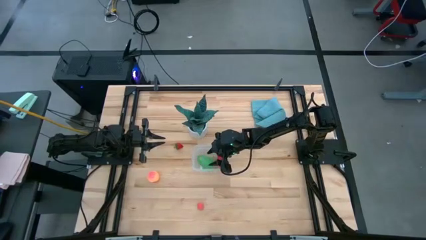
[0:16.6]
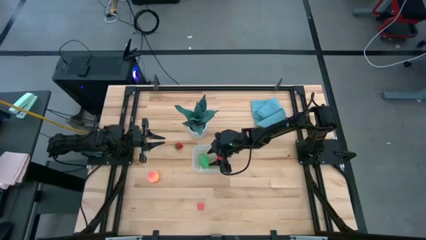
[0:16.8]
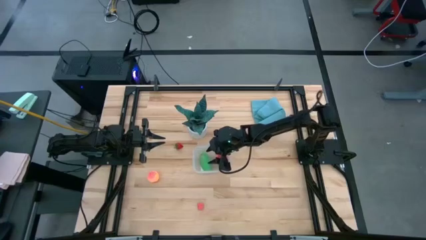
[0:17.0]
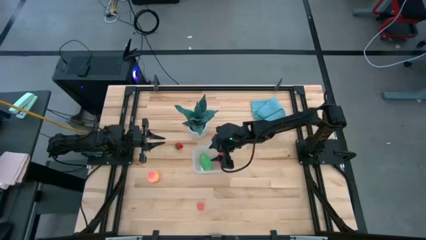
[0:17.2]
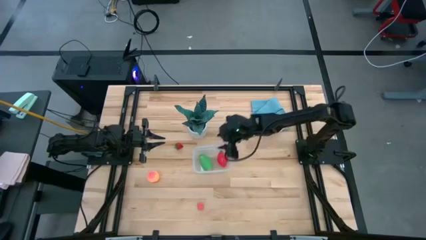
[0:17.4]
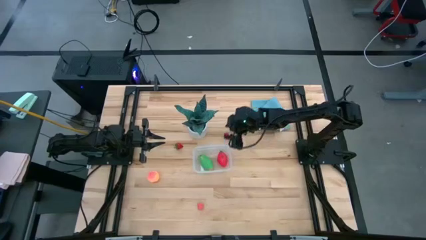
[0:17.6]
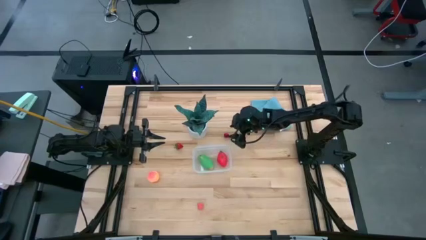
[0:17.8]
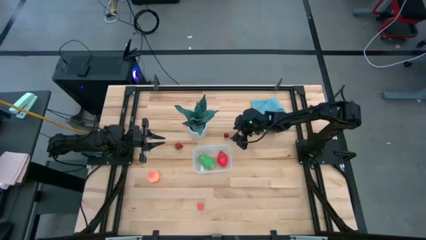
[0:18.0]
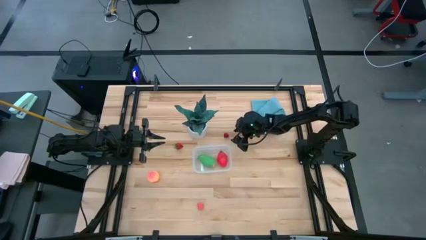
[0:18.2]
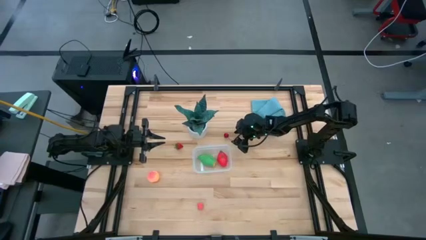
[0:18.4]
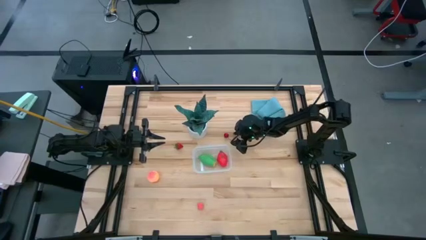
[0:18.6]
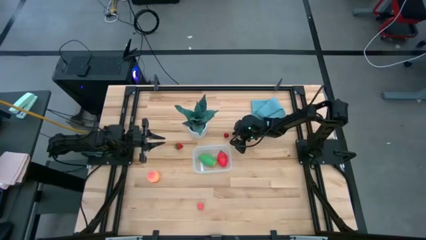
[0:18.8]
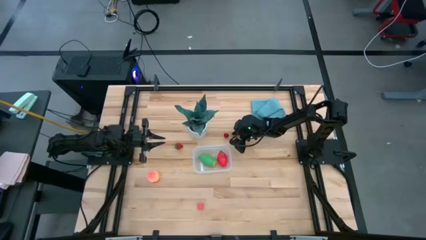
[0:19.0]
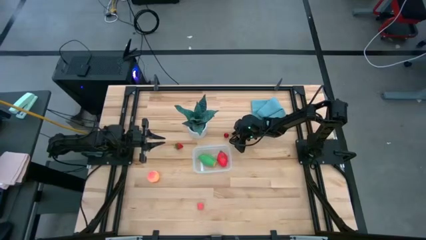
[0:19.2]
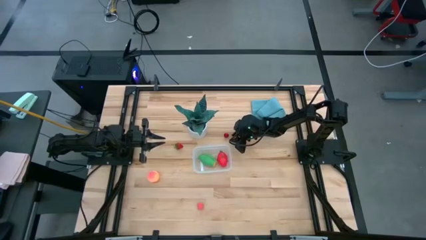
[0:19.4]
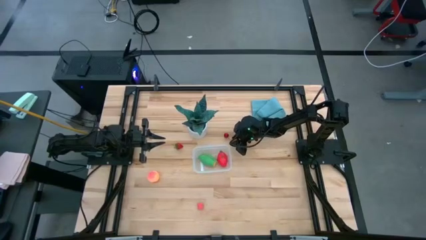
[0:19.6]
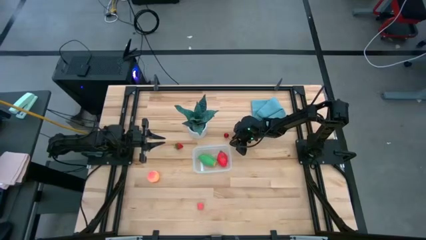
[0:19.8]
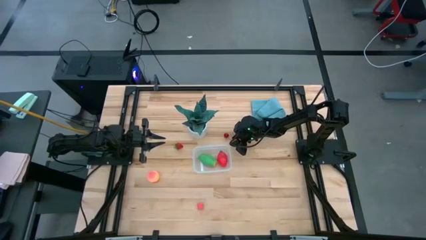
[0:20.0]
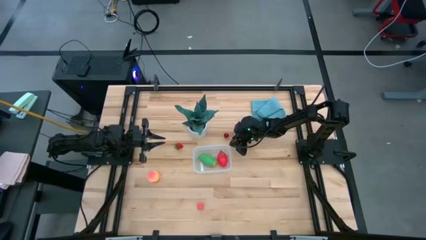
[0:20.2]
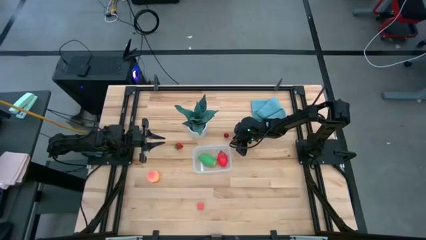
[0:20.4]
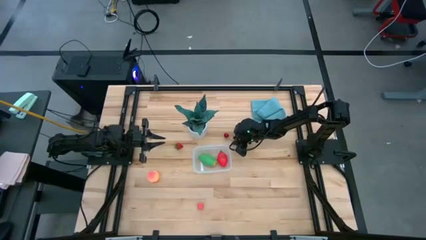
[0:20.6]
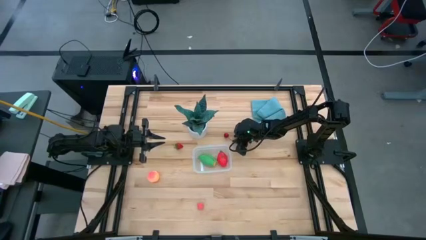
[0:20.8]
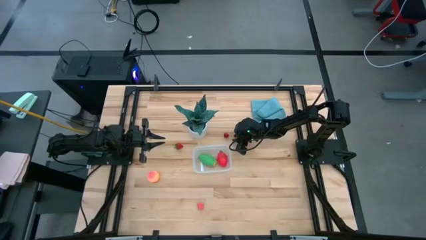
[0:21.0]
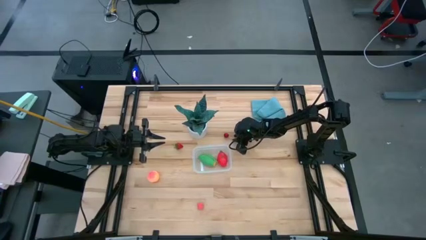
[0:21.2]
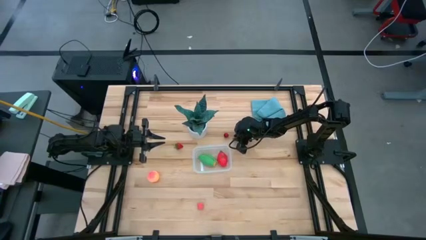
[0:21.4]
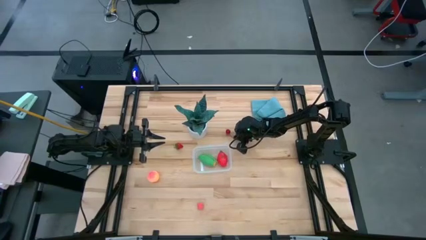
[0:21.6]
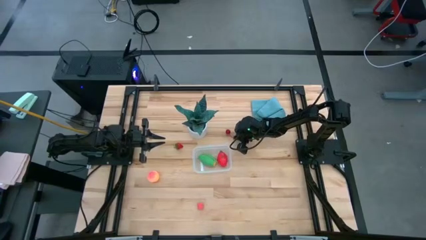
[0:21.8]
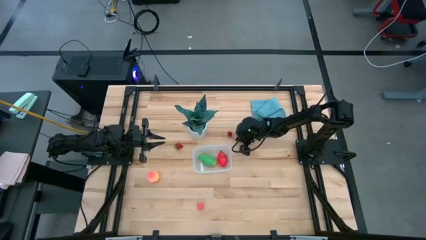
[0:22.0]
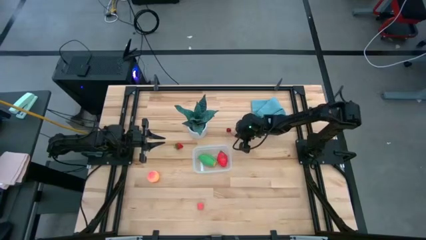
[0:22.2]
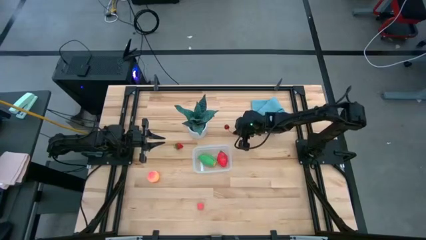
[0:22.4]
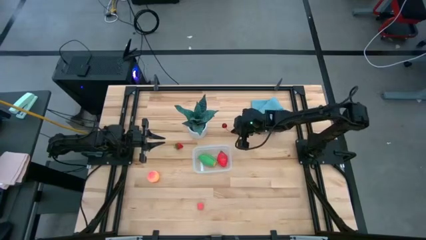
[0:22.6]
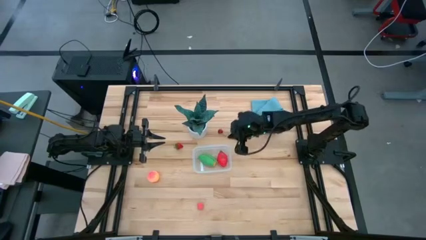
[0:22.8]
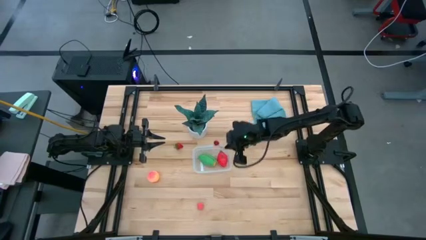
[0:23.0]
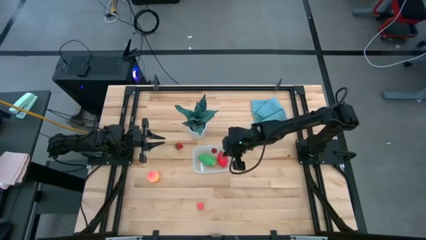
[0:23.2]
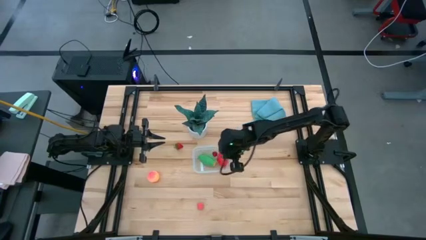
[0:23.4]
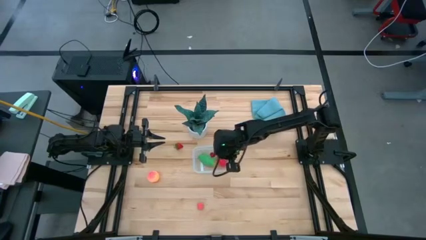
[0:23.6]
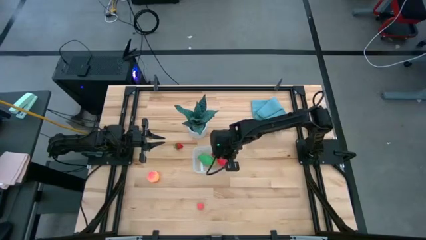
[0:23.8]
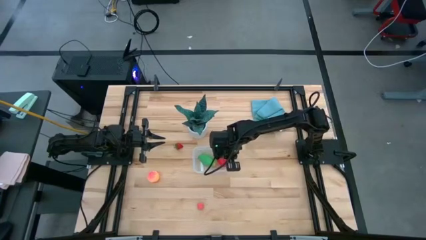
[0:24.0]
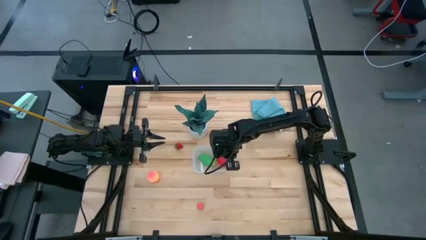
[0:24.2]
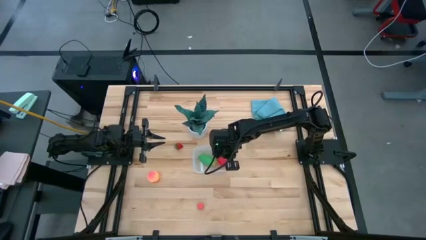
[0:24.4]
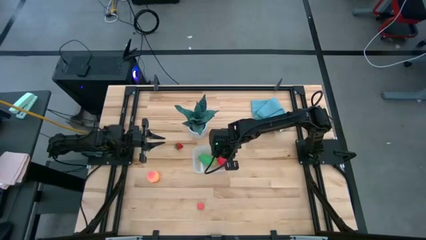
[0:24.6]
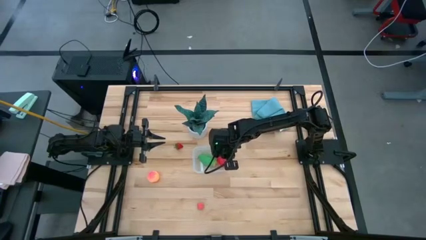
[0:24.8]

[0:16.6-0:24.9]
Task: Pick and placing Produce into tupperware
Put the cherry into the transparent container

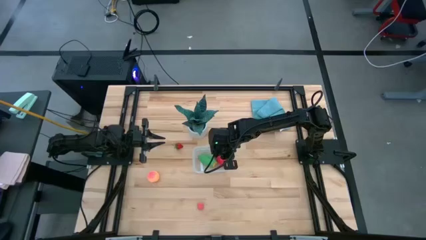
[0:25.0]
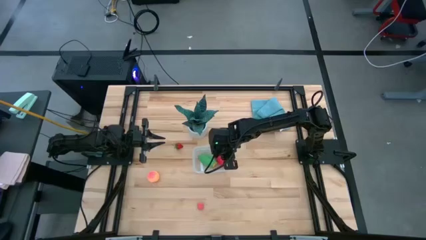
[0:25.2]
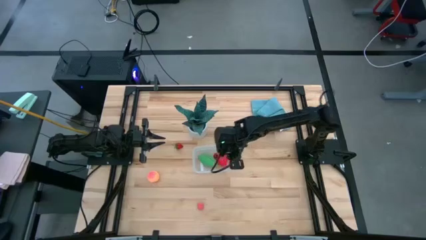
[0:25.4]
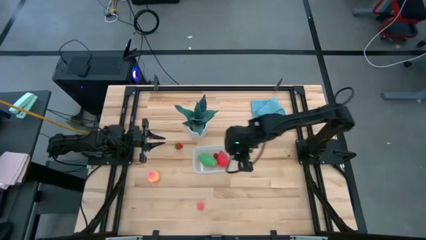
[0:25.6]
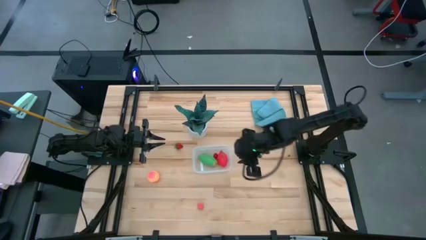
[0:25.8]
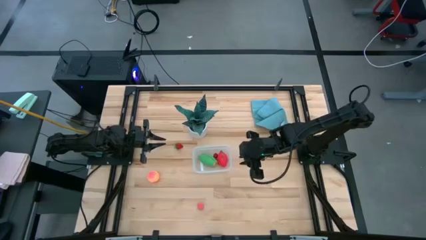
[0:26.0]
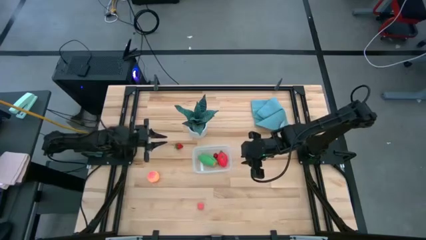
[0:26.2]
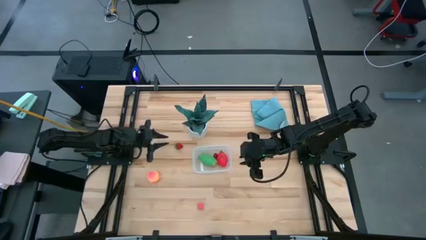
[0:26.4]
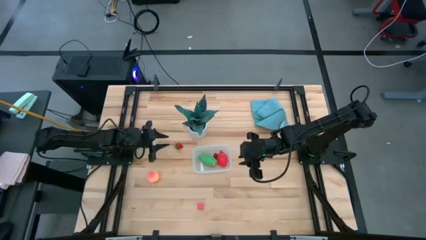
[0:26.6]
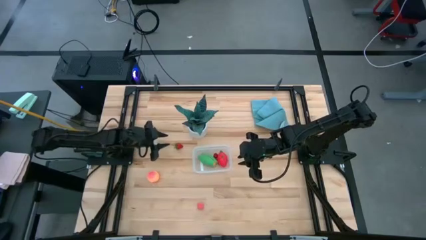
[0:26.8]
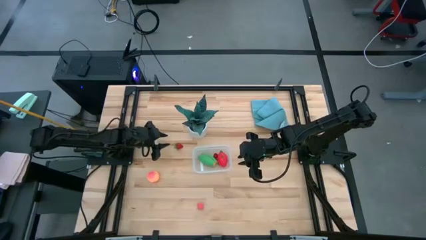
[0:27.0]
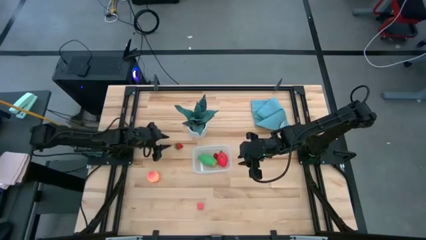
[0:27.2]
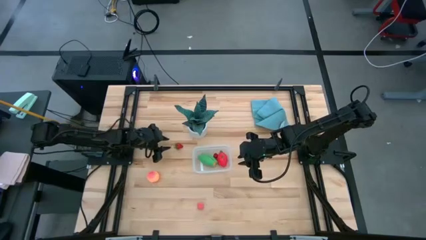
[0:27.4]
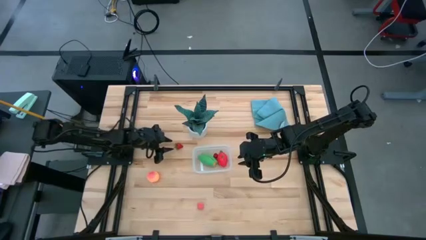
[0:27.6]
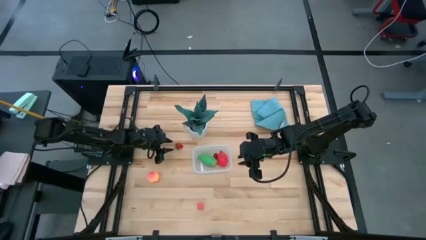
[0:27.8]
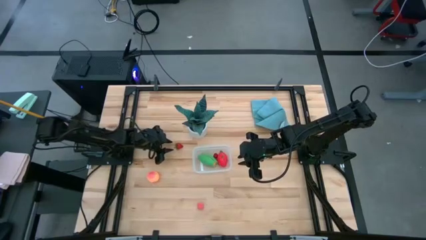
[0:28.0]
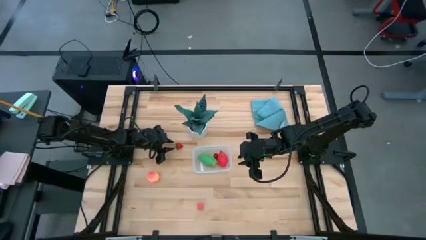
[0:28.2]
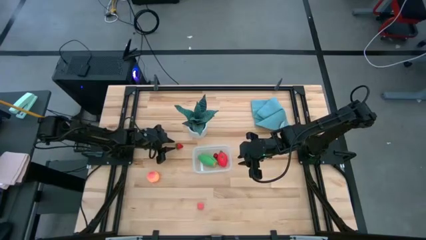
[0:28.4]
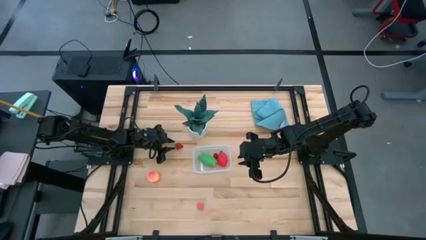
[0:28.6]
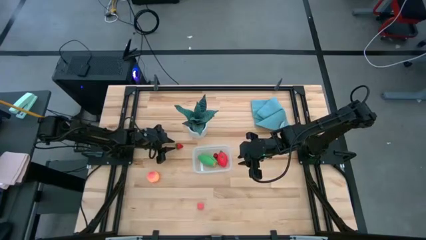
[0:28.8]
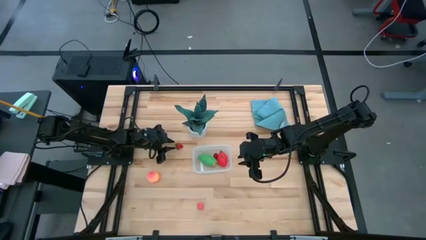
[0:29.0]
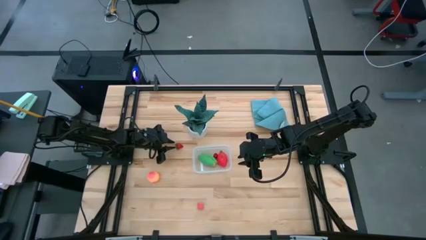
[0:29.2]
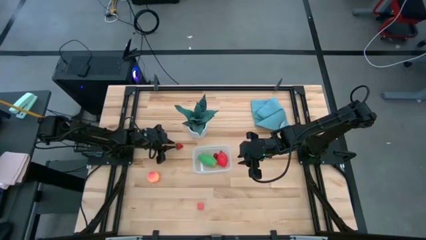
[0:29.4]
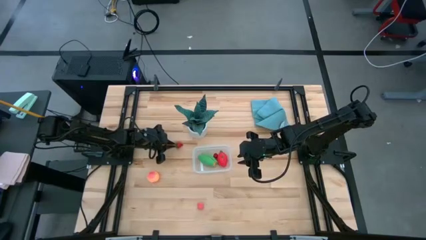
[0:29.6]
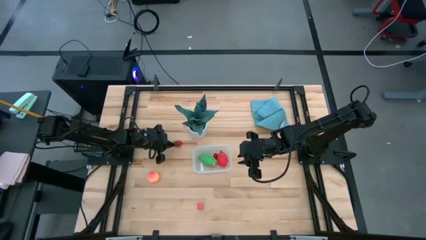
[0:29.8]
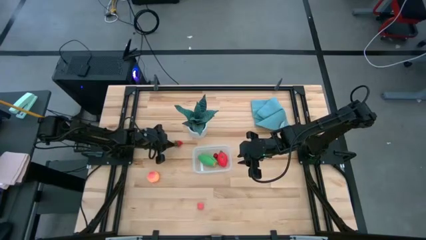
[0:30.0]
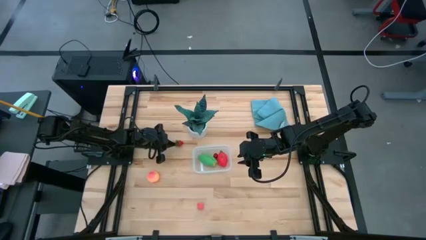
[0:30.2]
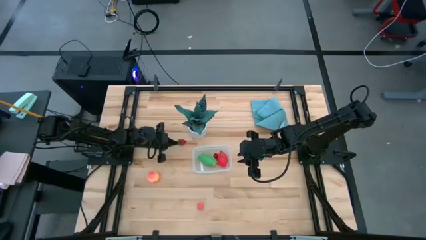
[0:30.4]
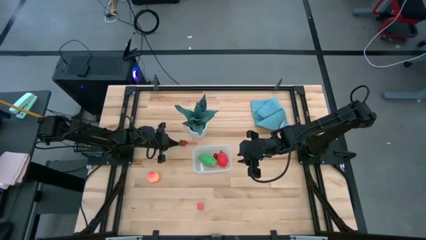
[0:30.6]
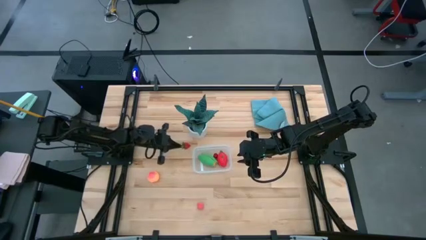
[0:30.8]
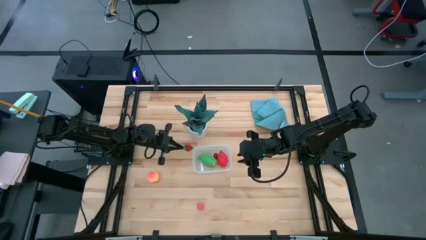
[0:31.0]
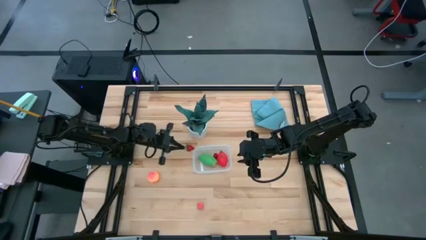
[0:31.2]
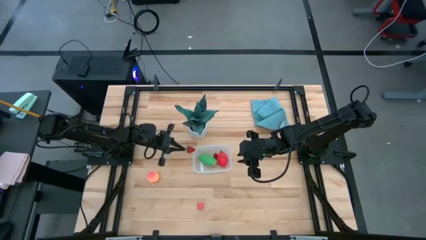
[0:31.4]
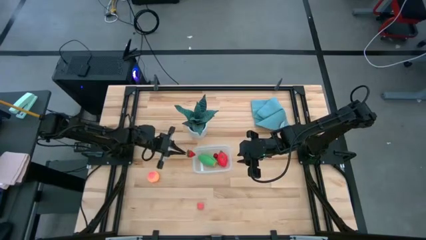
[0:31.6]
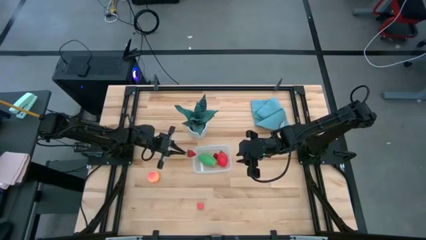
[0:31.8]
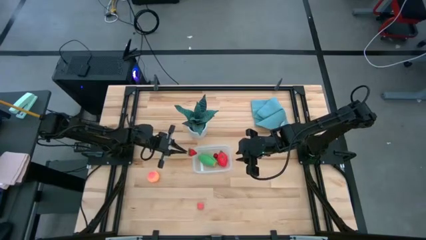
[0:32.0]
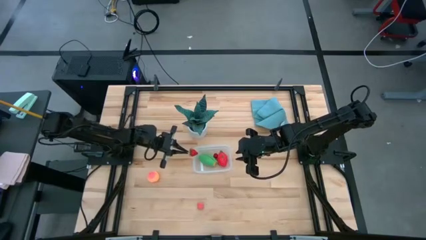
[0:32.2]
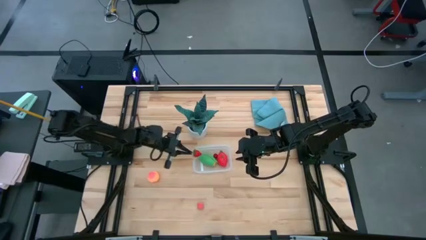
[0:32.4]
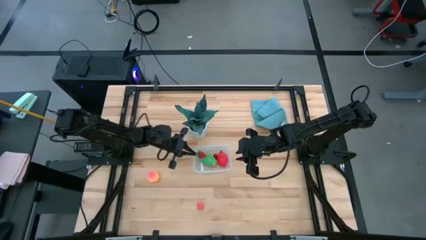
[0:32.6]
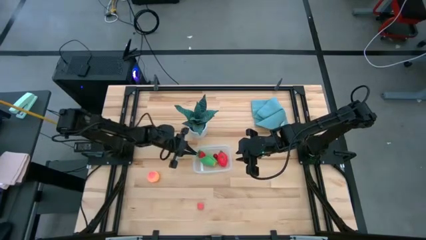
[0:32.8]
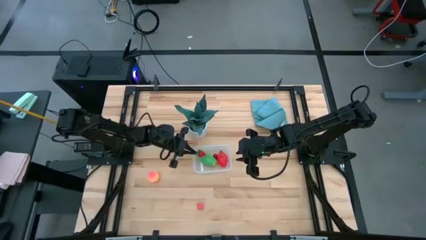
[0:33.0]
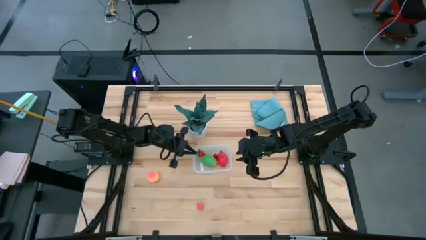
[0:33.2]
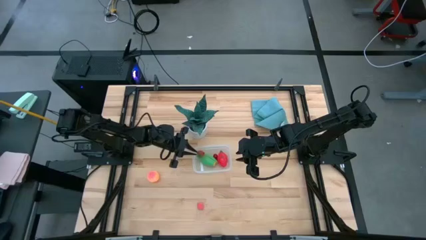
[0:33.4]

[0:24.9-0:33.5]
Put the strawberry into the transparent container
